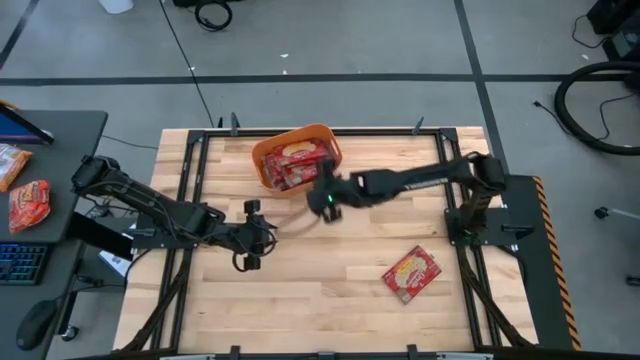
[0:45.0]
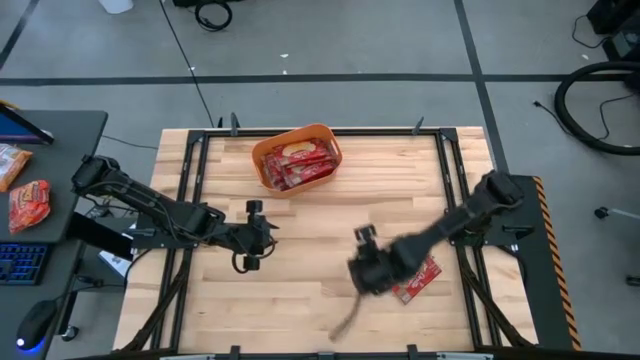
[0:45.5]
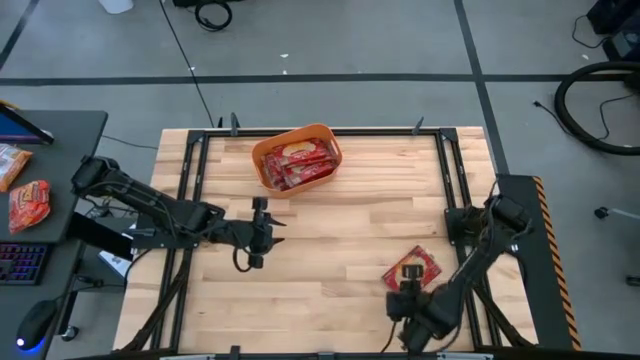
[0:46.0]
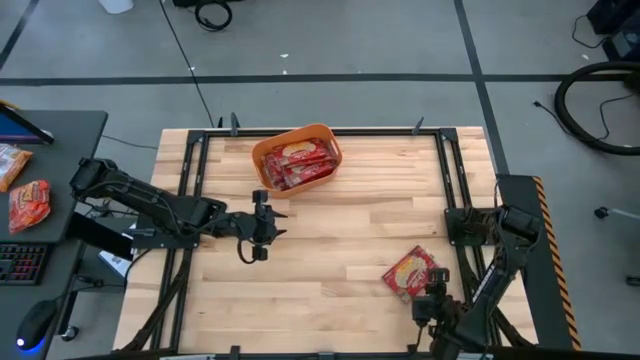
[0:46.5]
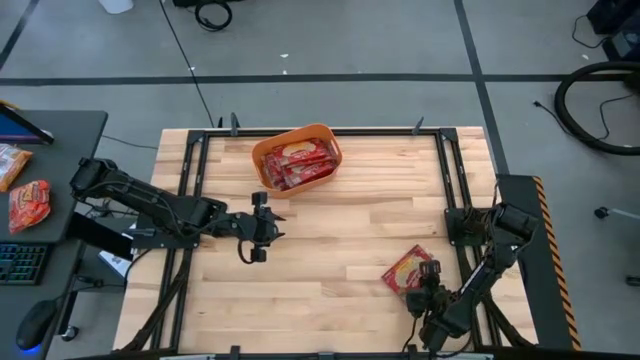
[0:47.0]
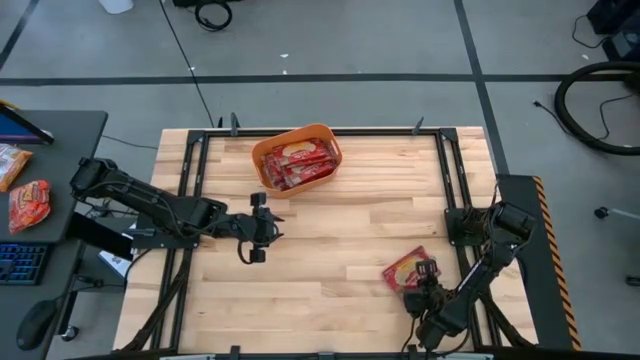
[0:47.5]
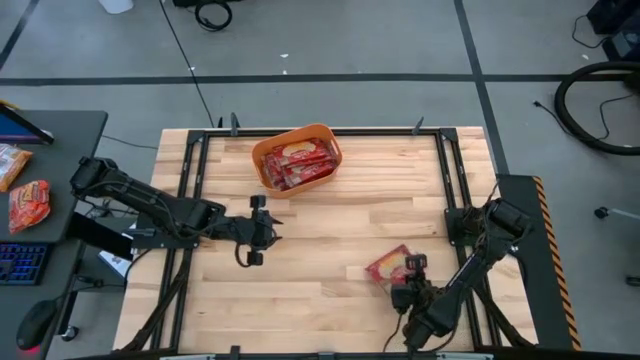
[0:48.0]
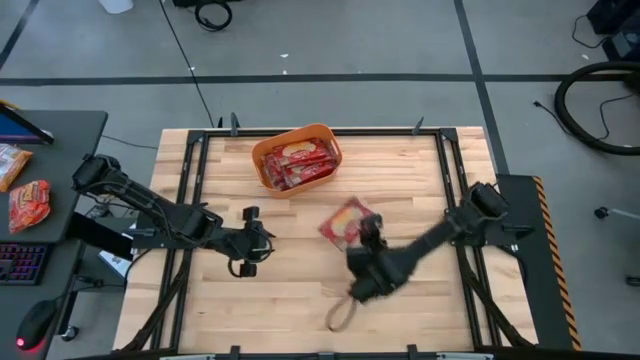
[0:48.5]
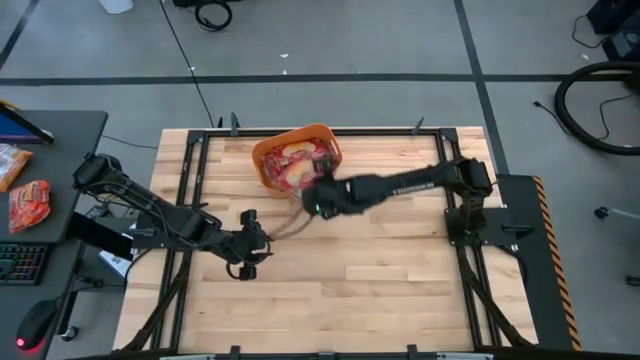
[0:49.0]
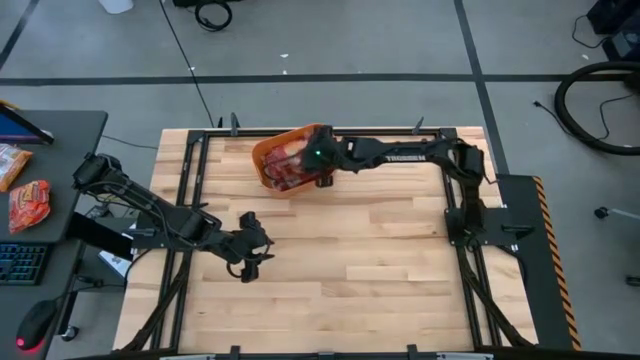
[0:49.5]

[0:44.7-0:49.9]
Task: Sort popcorn bags into baskets
Put the red popcorn bag into the orange bin

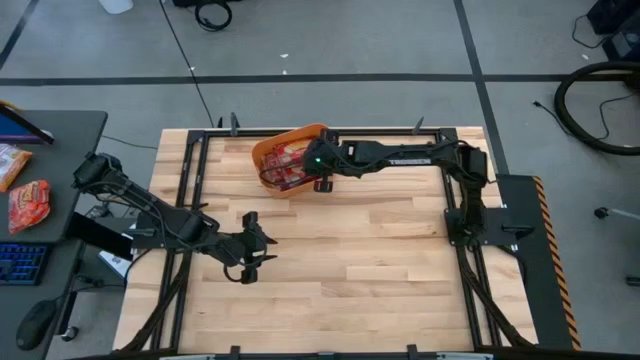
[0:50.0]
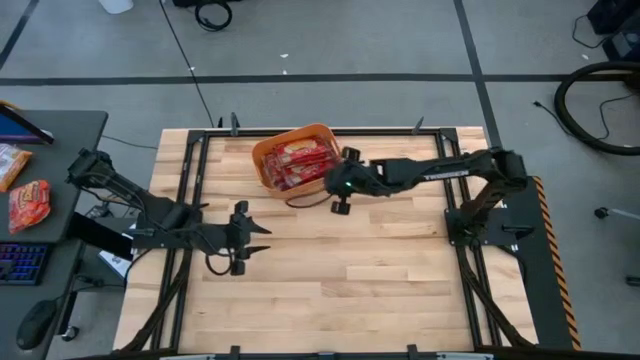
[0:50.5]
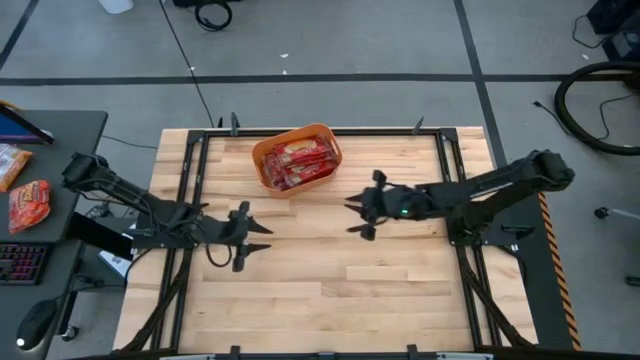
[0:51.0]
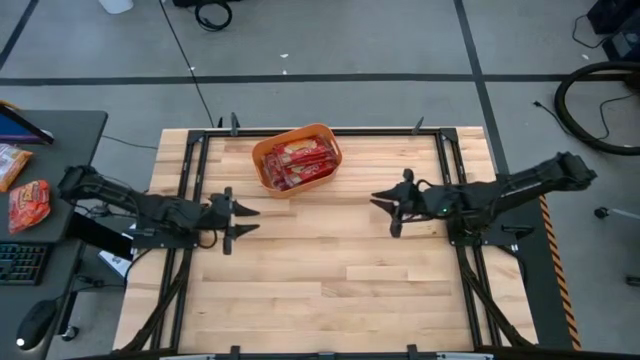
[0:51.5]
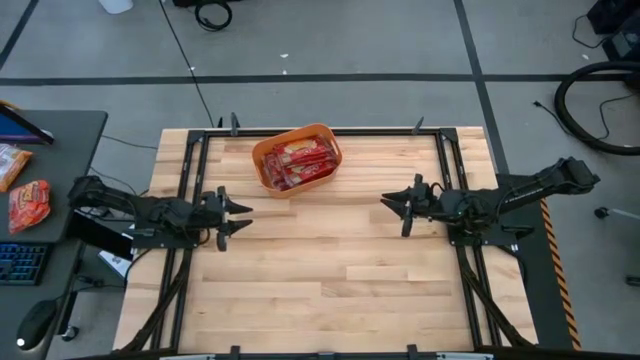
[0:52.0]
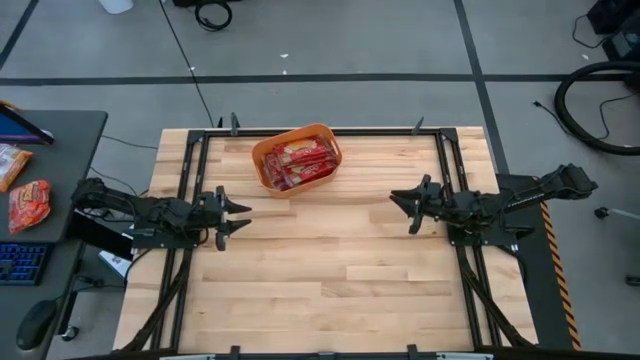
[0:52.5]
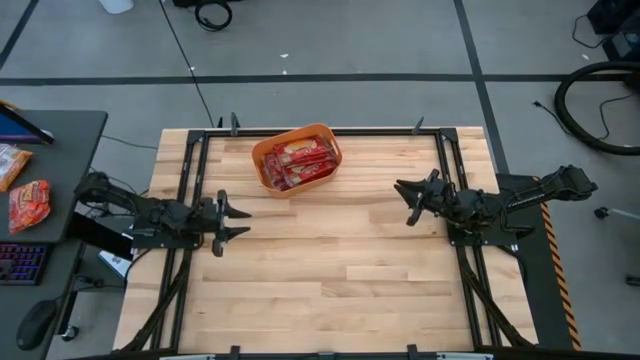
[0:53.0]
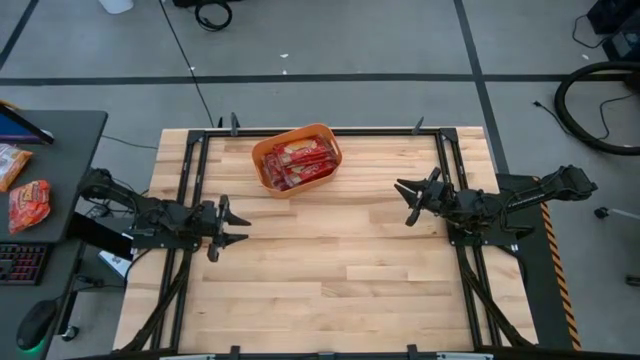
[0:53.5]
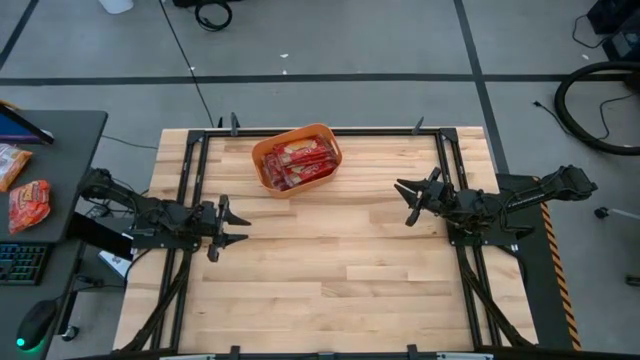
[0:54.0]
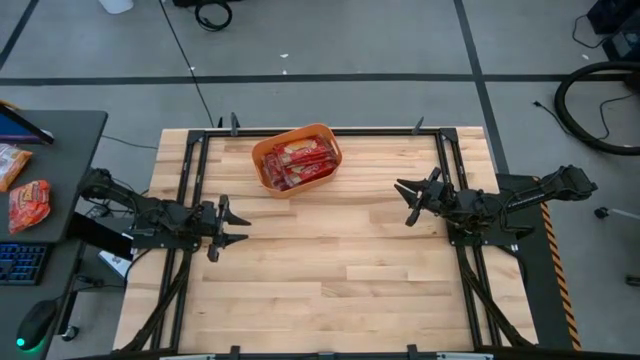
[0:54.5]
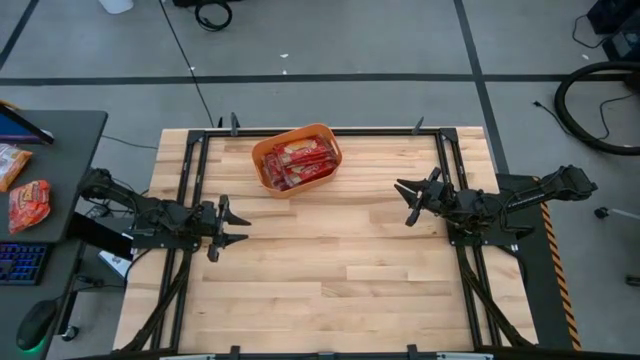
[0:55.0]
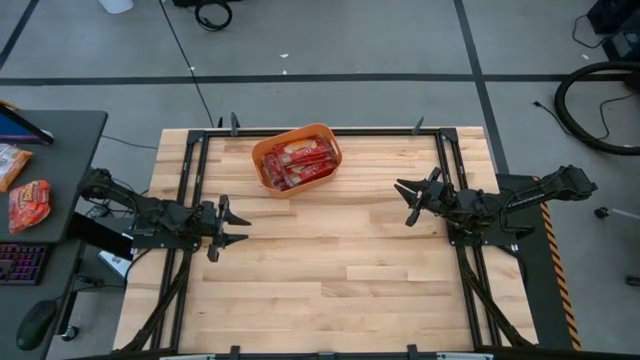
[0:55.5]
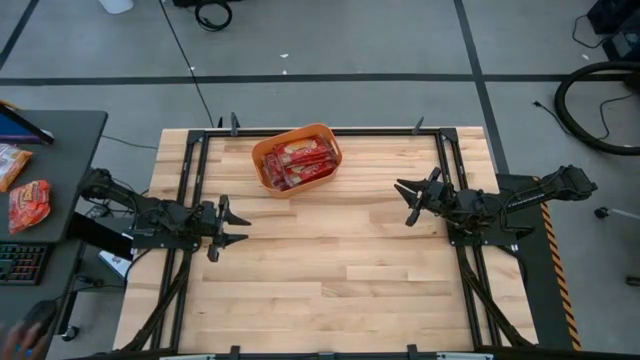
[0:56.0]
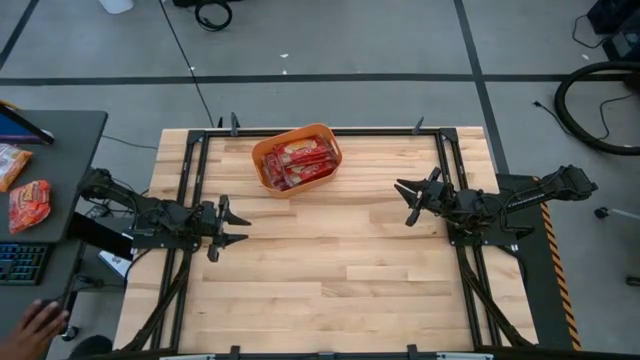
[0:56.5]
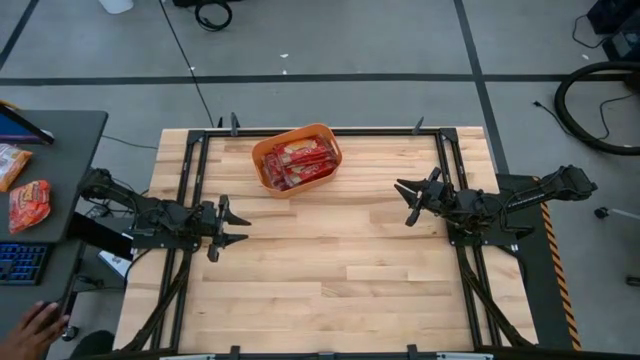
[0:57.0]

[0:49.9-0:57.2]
Return to Home Position

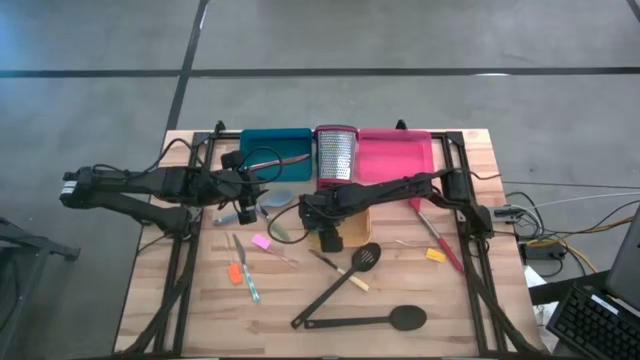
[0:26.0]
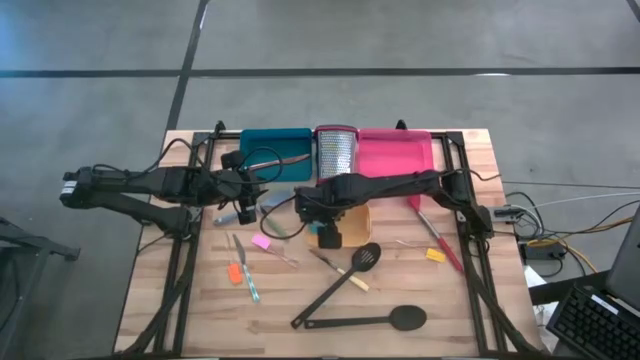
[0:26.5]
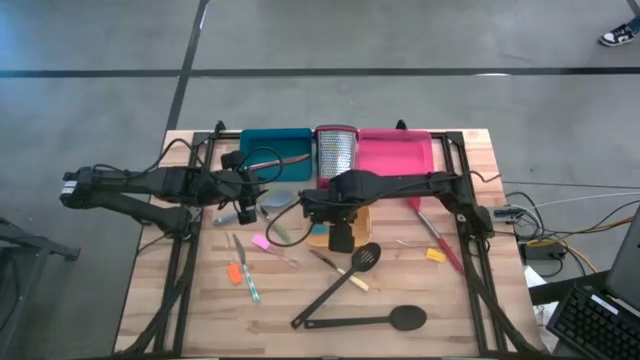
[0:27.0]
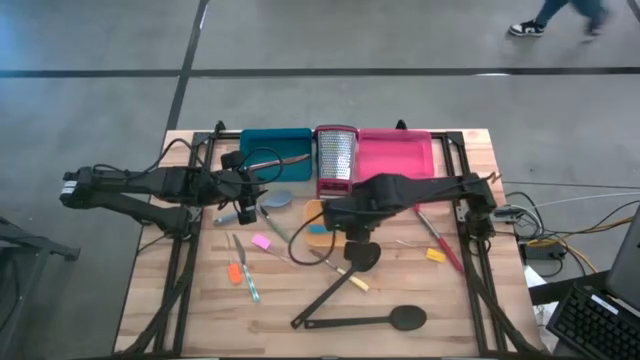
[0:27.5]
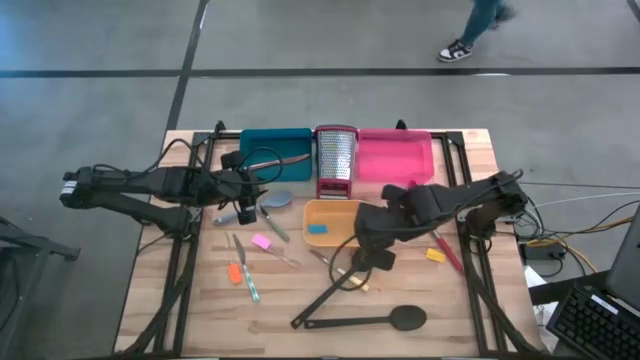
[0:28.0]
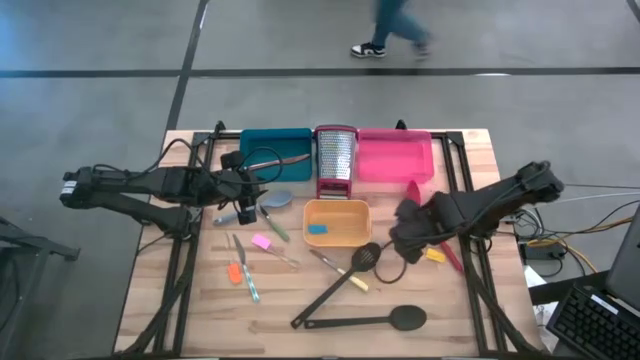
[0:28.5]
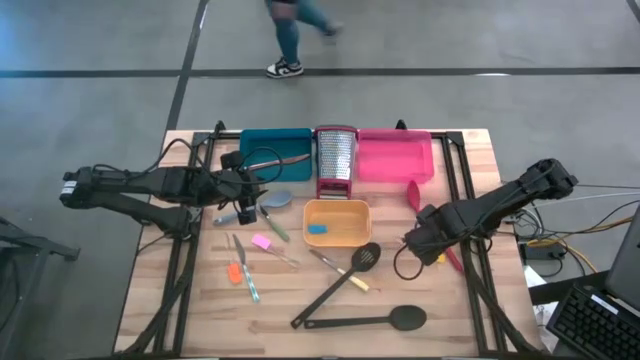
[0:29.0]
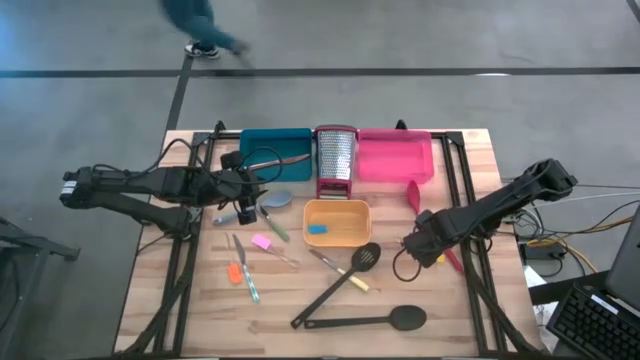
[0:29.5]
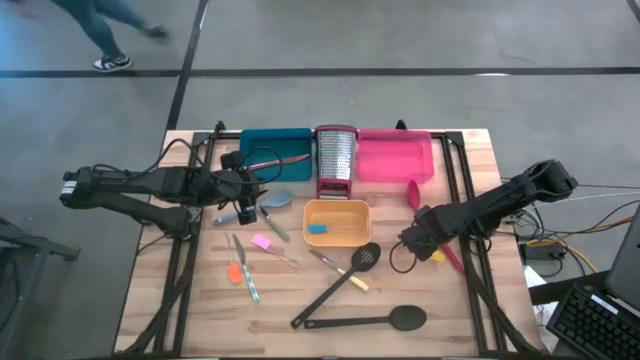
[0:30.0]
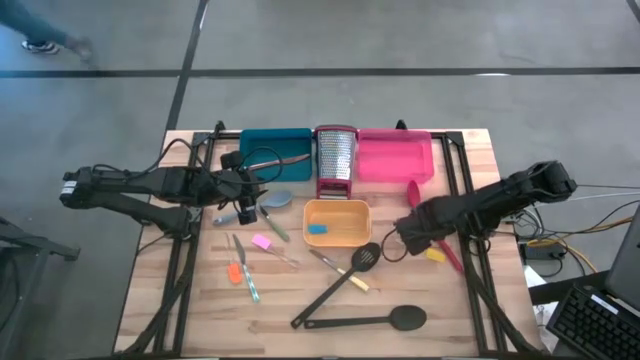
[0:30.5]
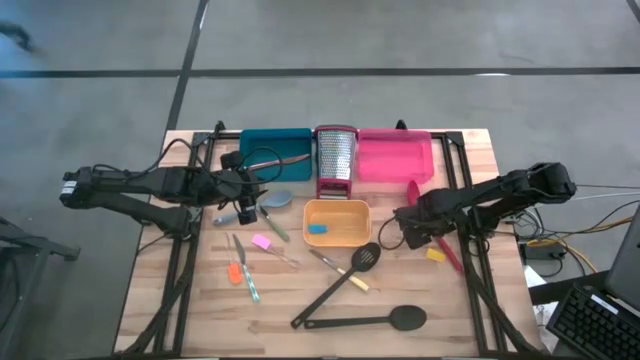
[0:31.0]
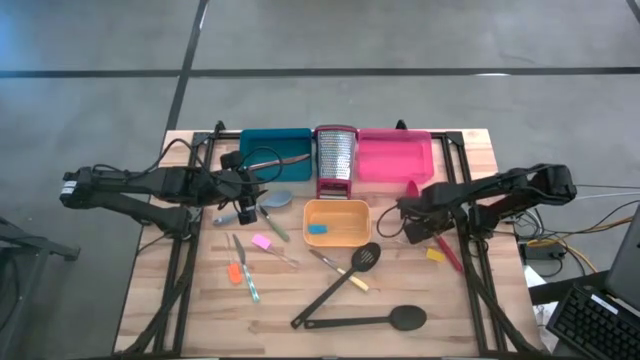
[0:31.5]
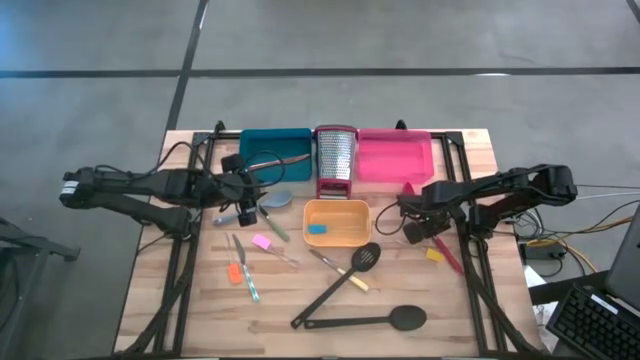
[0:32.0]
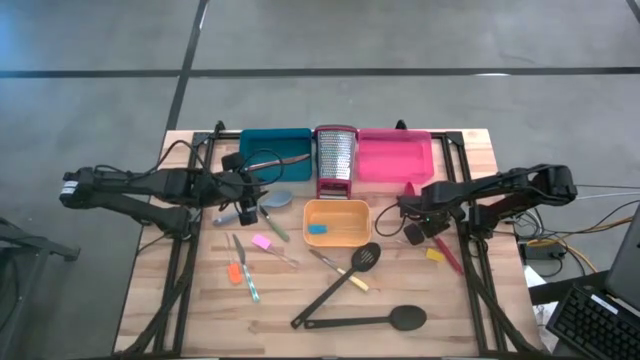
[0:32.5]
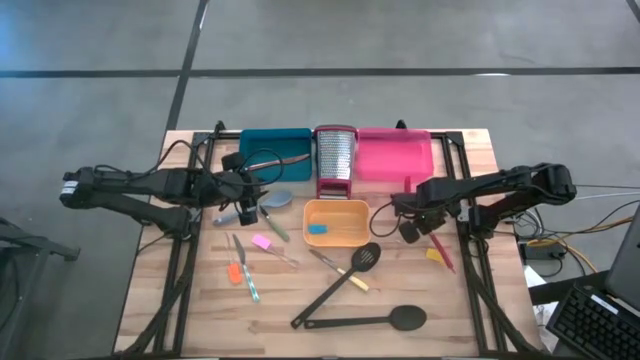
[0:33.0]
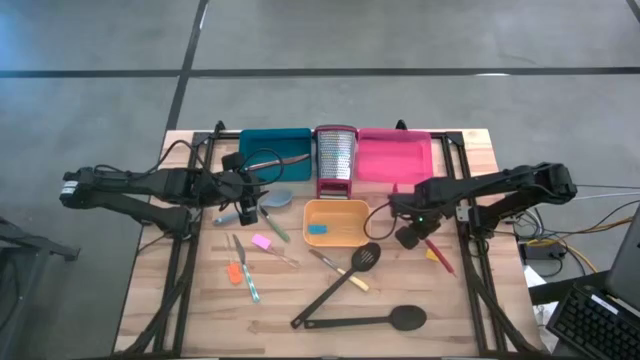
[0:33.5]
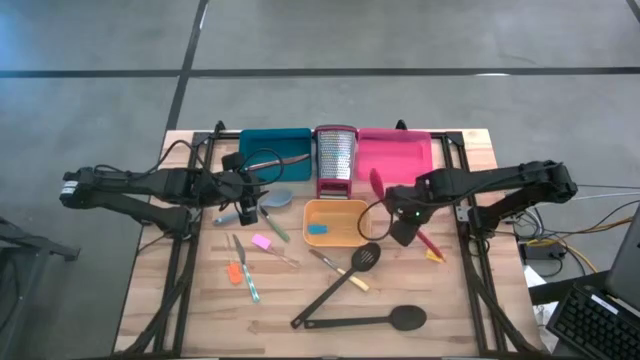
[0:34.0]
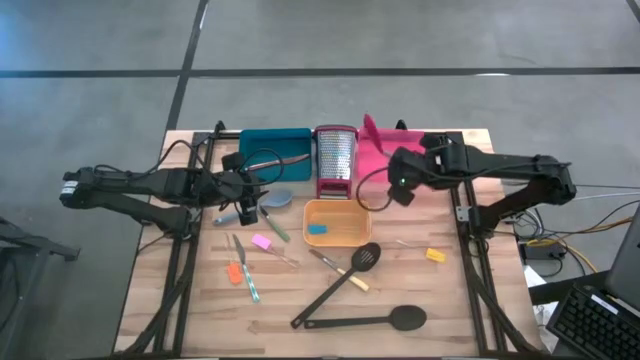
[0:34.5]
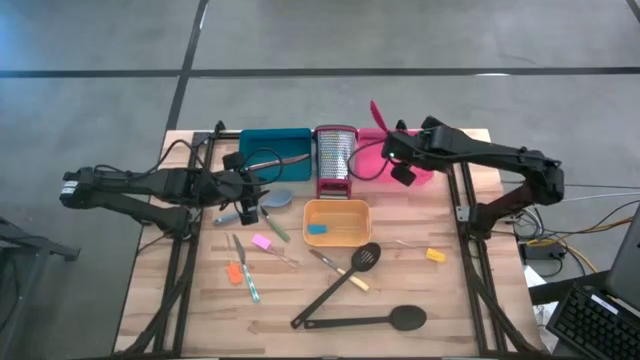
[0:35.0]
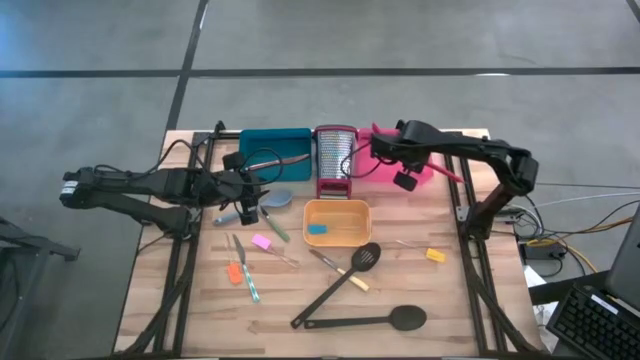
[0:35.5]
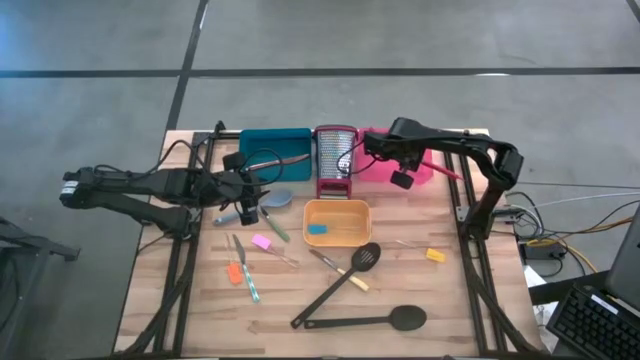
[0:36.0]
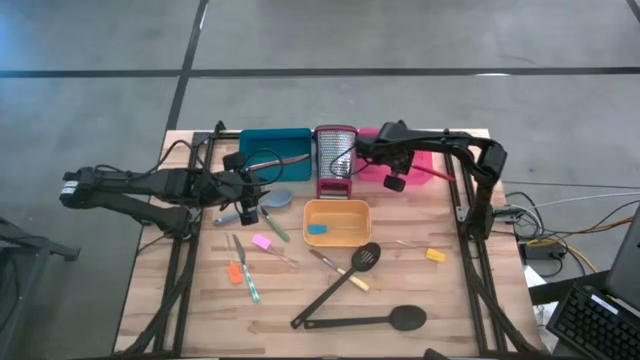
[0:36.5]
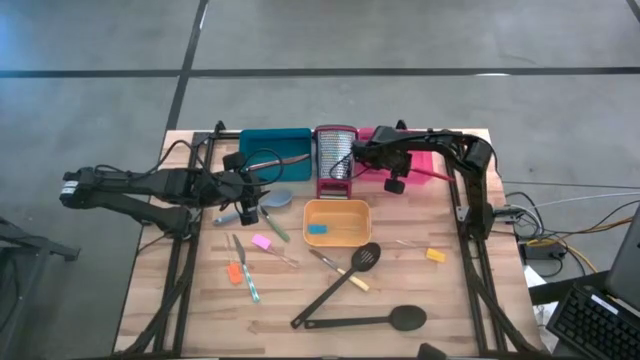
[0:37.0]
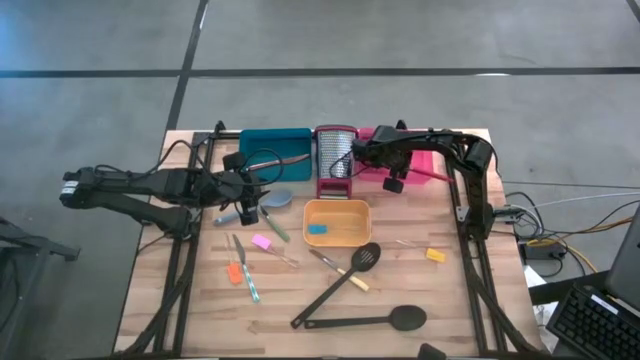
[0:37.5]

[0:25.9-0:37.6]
Task: Pick & Place Kitchen Items
Put the pink serving spoon into the pink bin
